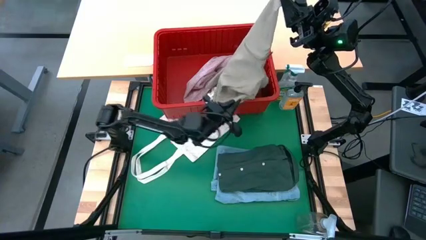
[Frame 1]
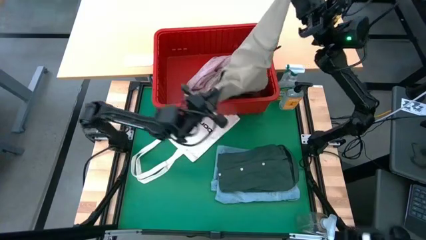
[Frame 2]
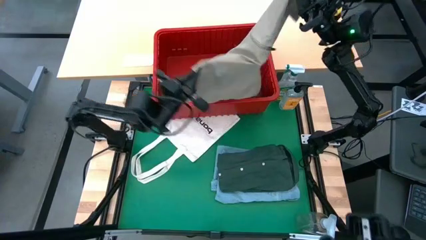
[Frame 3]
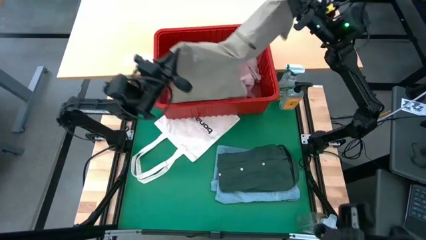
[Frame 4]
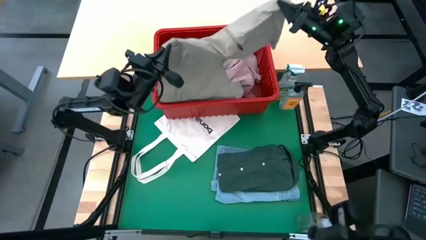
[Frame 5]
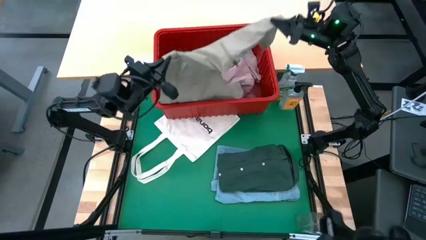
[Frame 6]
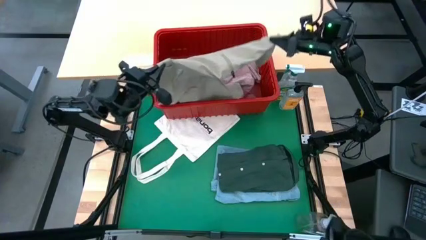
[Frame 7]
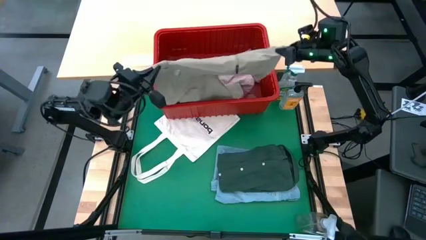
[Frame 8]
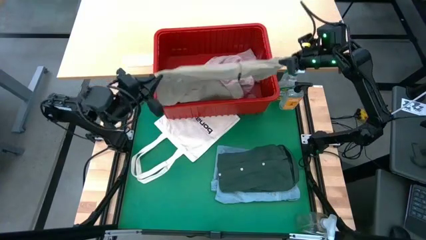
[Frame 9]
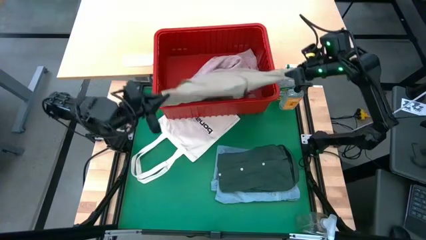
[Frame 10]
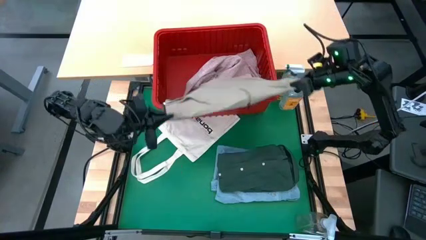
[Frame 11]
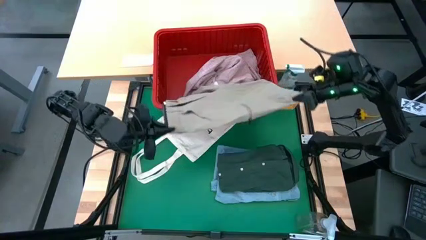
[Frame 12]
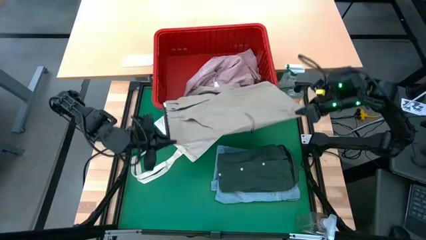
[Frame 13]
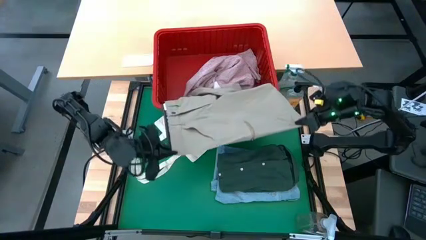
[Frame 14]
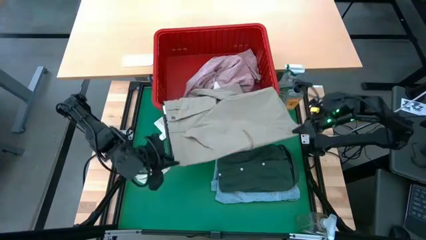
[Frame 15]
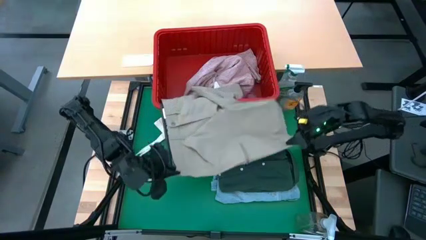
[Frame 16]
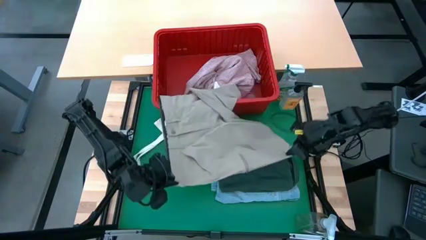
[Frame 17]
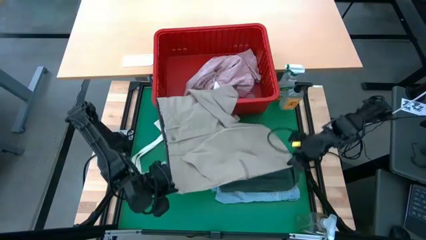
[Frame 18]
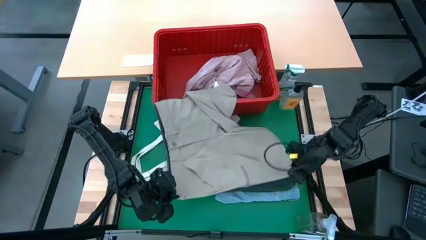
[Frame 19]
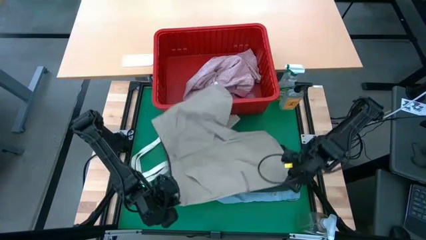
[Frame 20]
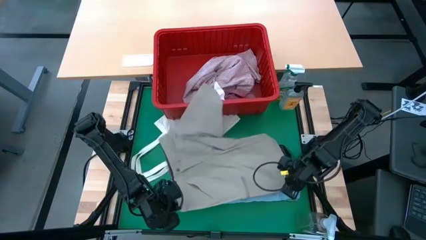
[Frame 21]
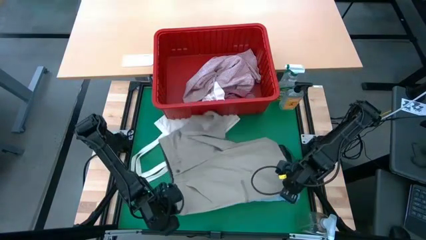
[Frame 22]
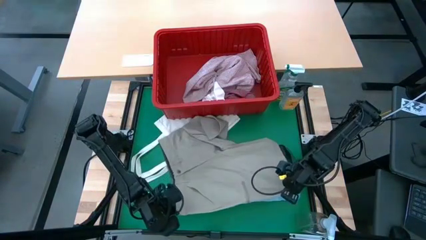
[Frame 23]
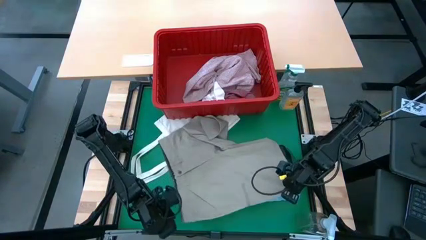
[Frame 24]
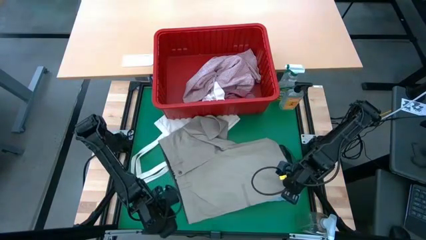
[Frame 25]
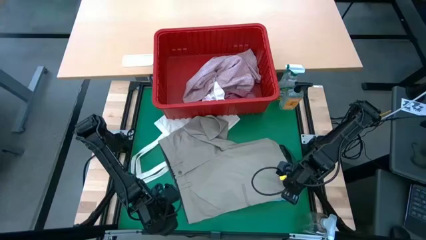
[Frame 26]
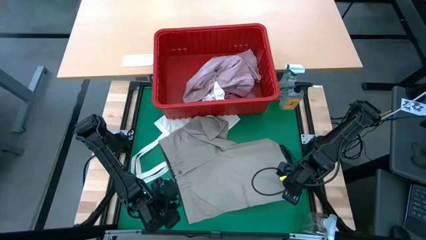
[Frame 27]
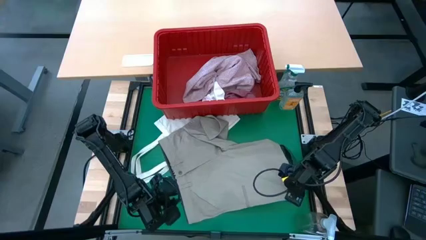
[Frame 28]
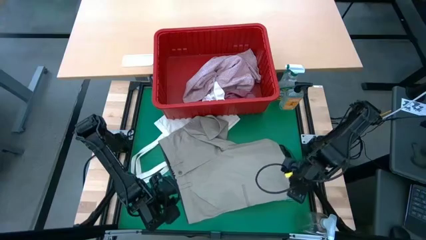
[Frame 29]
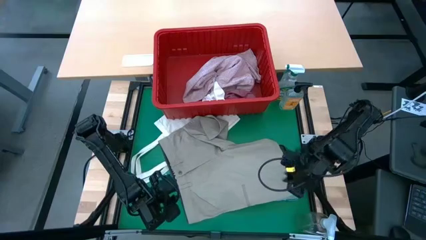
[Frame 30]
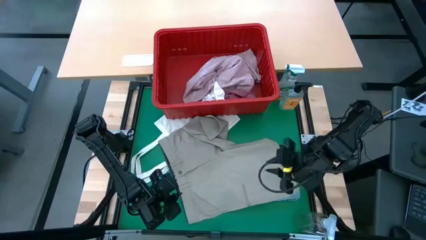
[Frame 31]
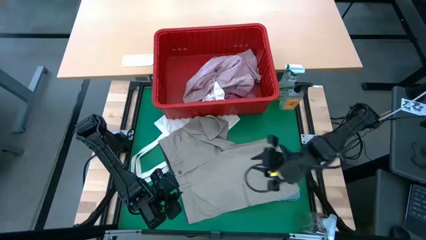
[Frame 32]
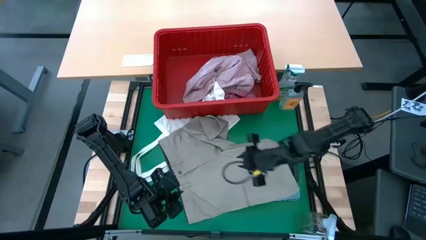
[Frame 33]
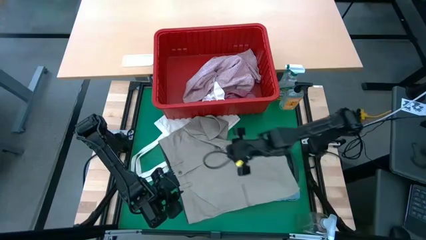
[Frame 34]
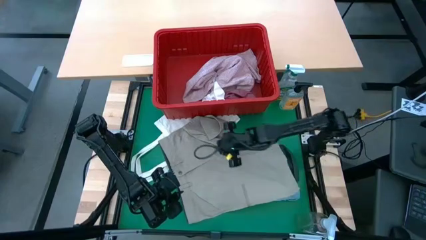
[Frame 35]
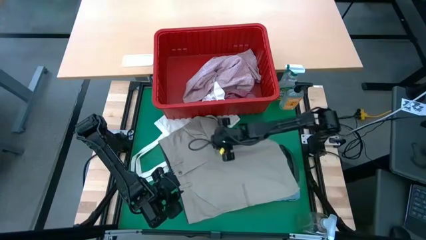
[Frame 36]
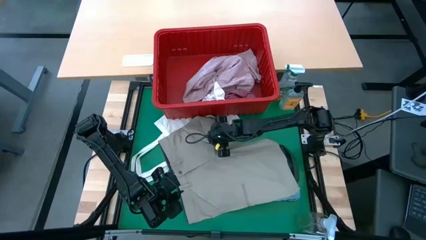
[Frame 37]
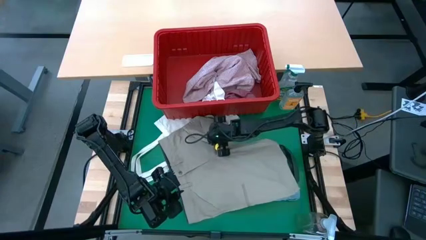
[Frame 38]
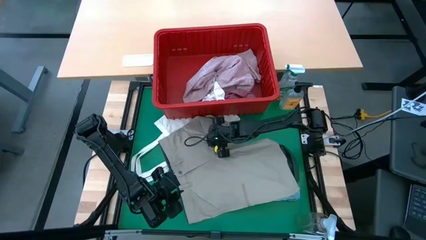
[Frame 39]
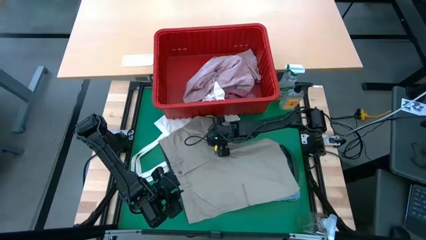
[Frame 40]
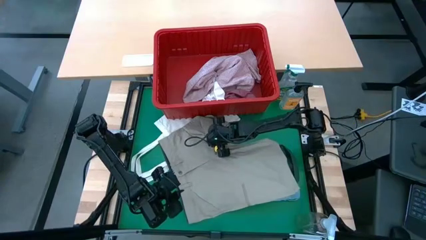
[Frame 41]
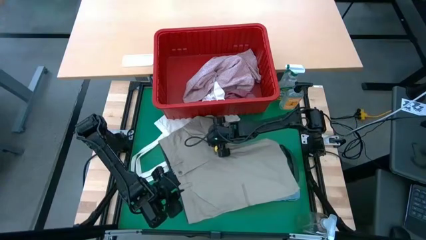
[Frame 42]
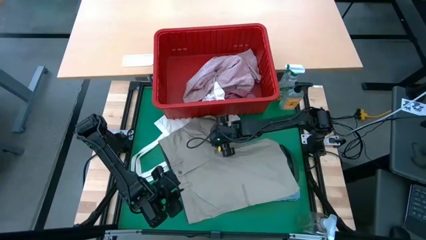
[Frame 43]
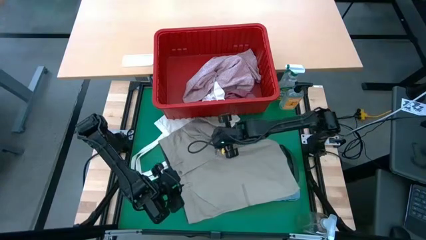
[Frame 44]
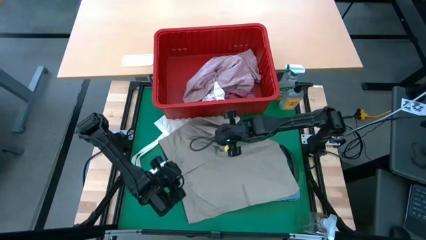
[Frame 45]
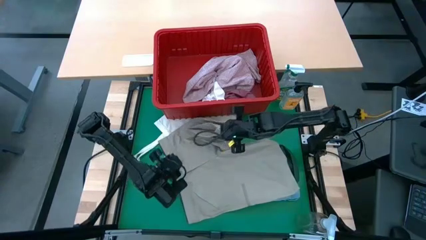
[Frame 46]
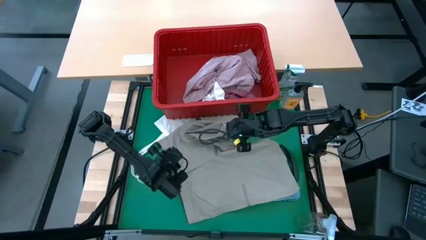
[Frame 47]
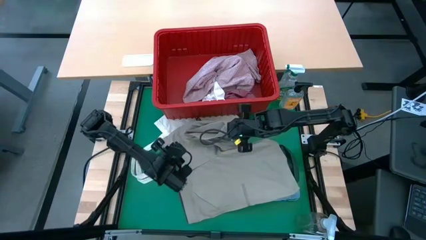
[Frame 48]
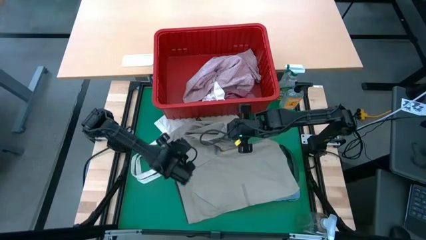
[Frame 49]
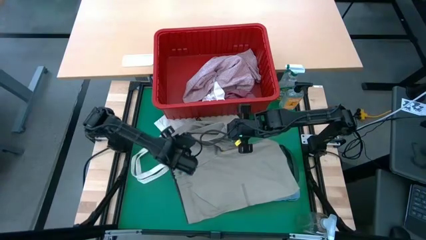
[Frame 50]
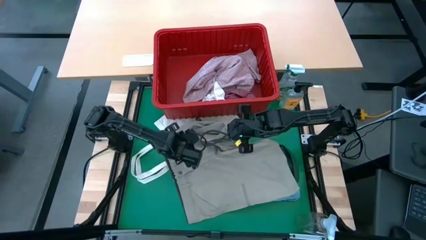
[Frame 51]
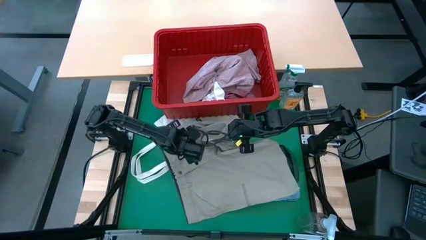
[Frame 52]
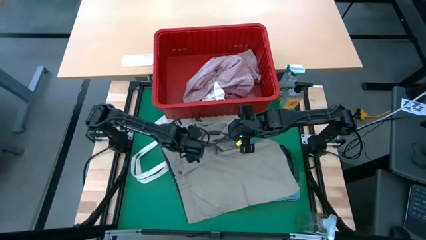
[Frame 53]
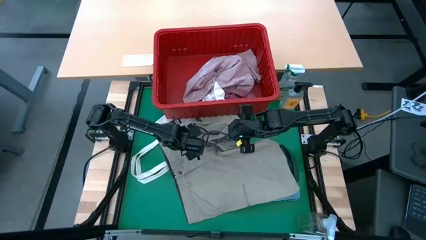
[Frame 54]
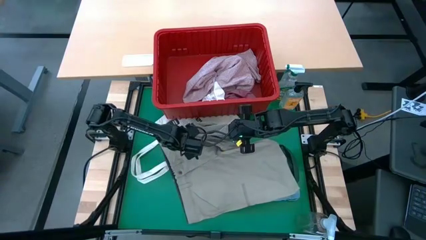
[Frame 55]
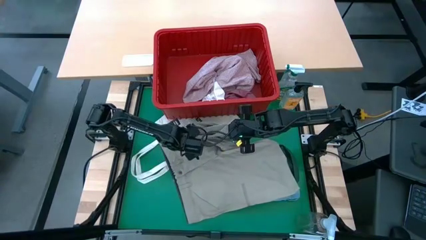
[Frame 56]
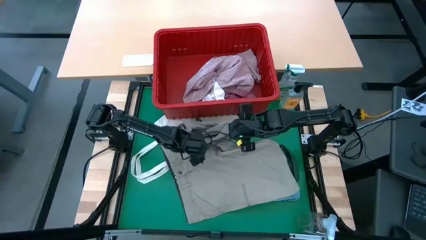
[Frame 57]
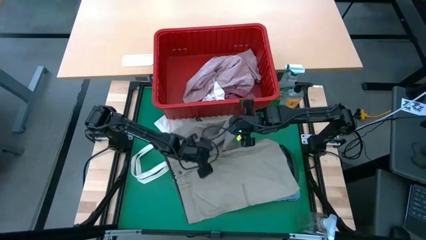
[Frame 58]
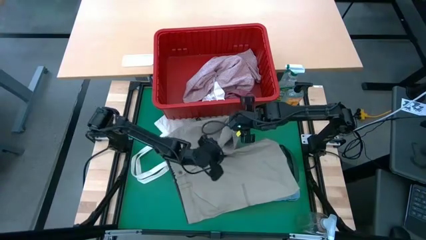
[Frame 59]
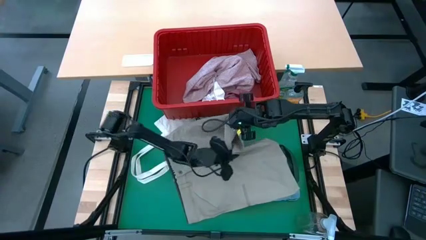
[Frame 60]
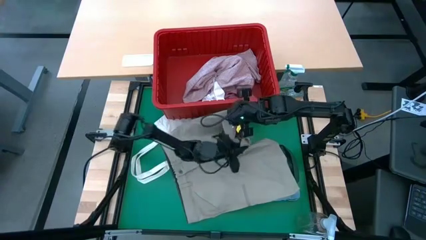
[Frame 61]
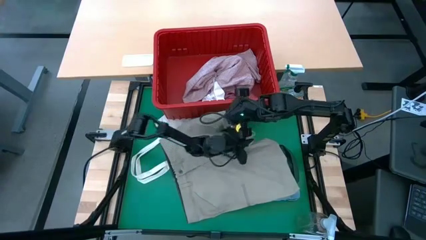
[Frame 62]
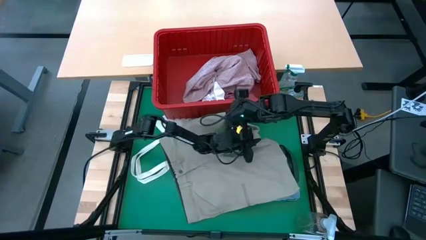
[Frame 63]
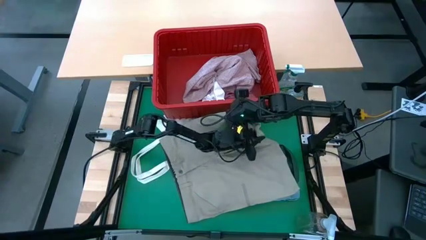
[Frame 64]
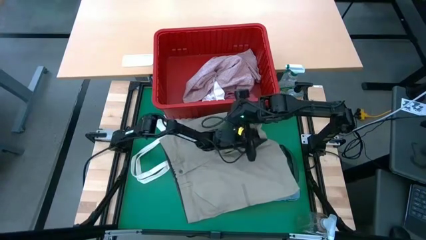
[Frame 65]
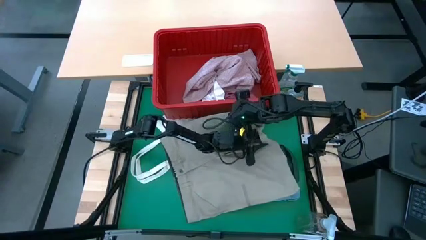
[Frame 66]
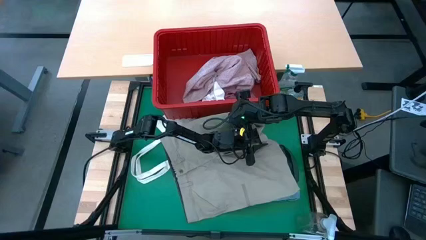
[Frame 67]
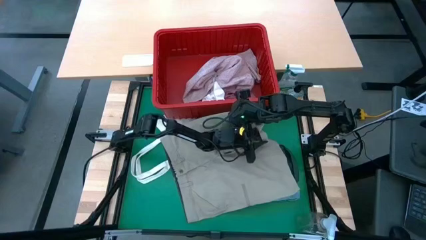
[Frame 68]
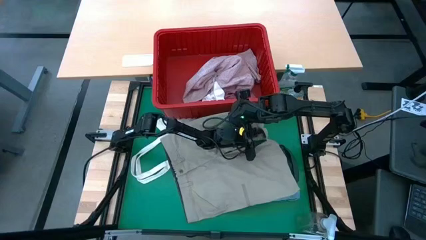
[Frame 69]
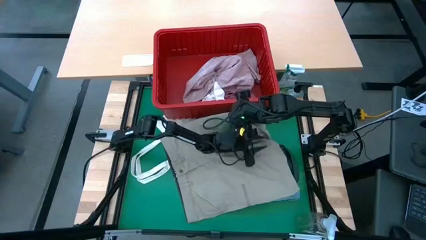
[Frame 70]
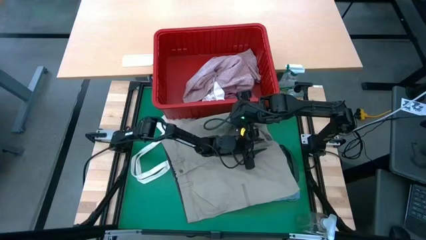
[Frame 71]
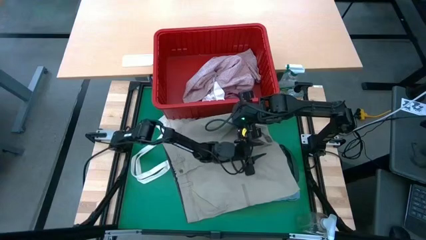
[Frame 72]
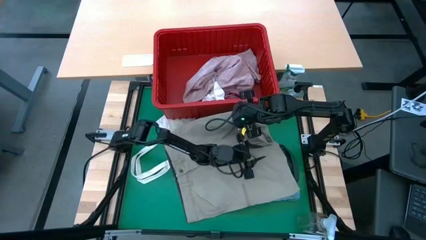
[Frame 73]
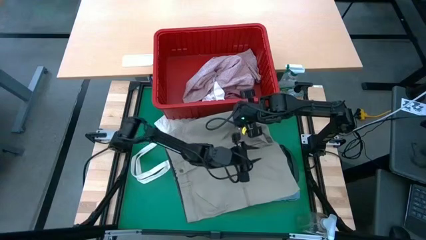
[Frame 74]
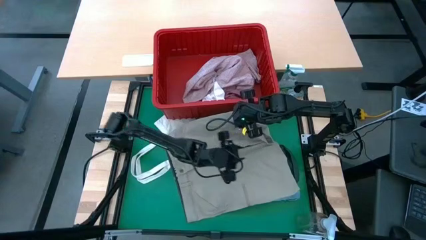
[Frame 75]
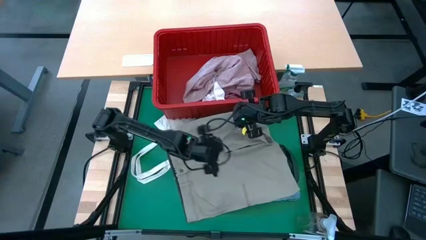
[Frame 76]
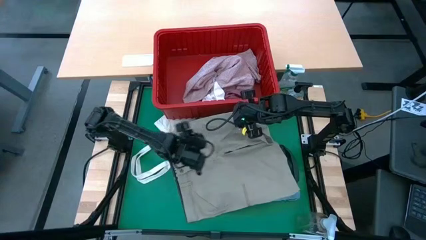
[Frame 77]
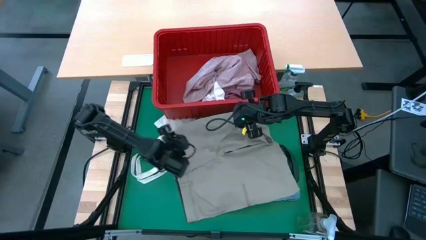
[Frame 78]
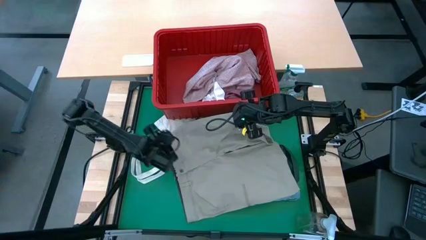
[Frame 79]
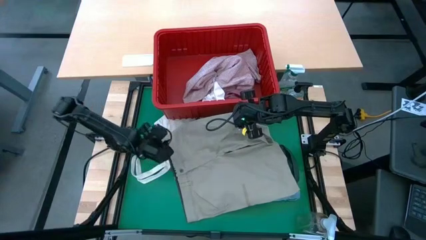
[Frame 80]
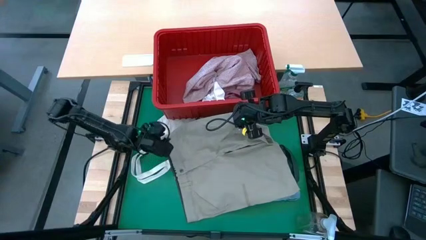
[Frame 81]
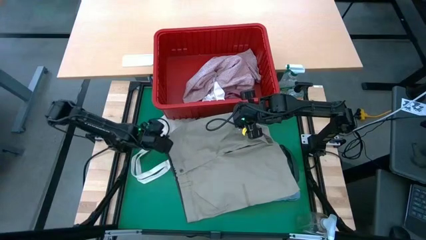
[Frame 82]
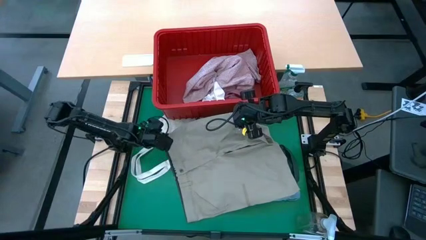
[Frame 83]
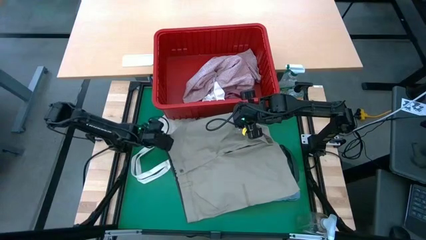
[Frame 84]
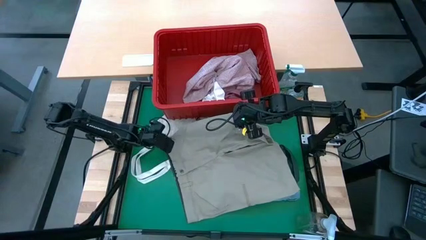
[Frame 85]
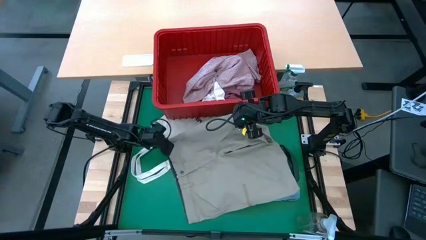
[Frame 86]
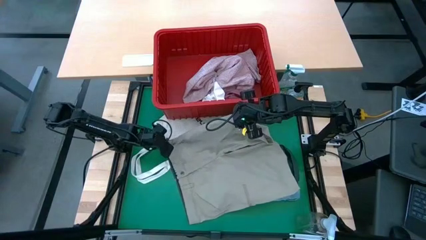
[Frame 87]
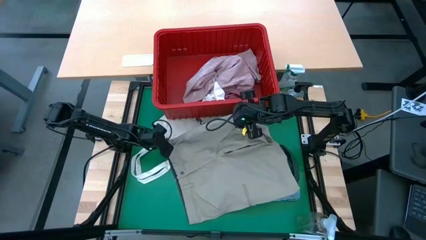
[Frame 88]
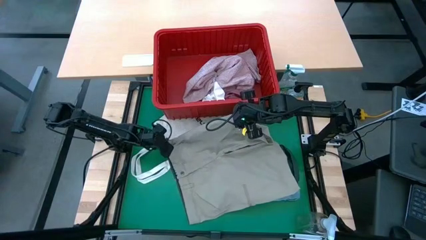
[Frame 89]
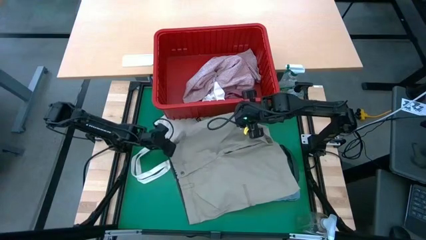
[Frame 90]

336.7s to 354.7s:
Task: Fold laundry
Fold the gray shorts
